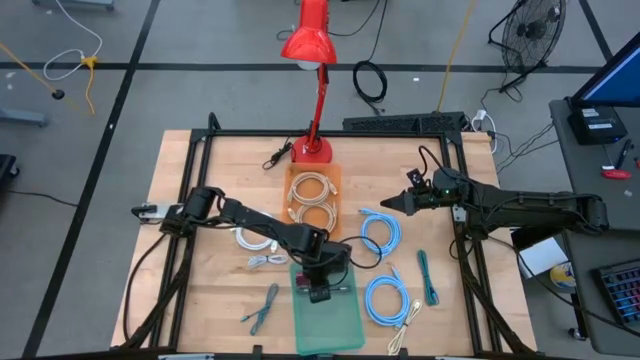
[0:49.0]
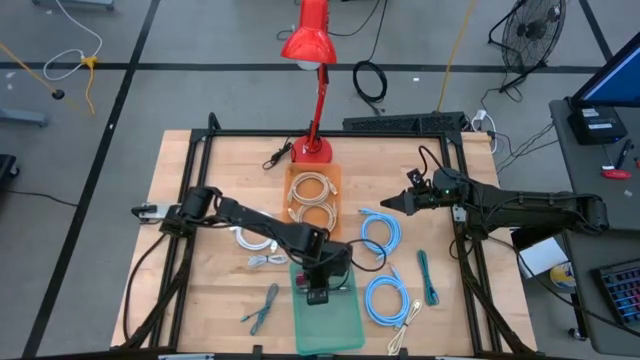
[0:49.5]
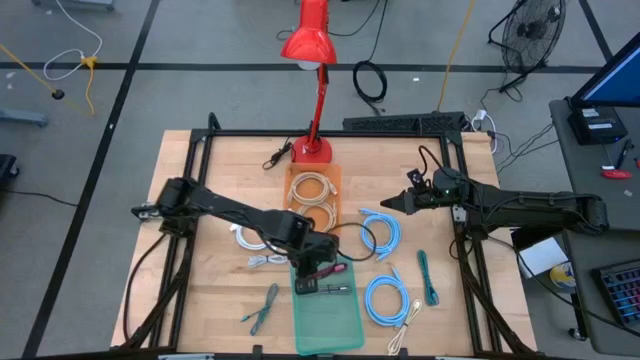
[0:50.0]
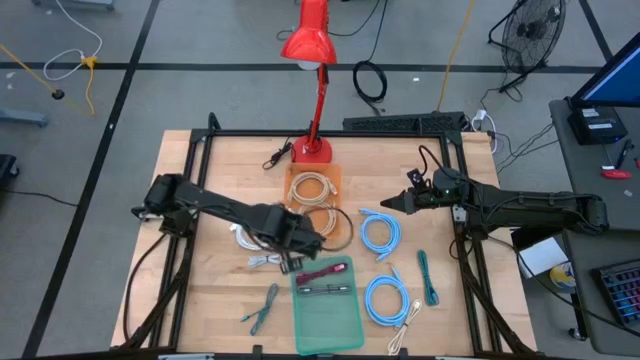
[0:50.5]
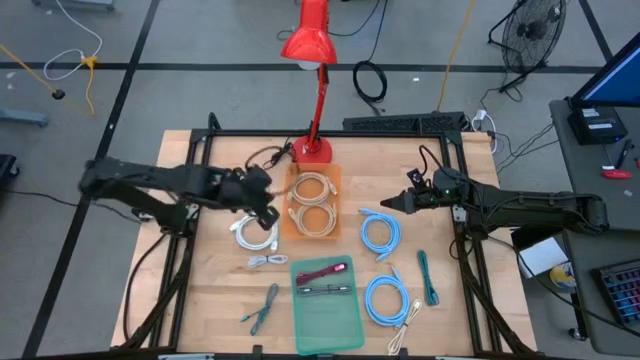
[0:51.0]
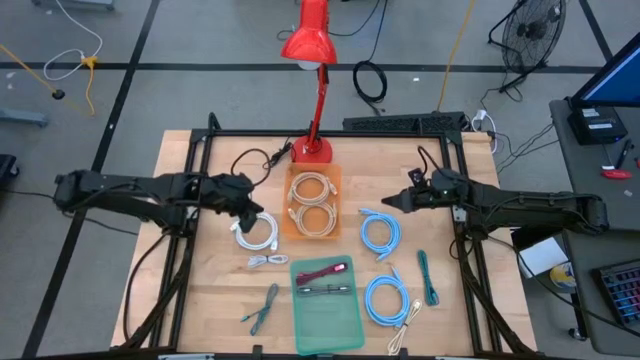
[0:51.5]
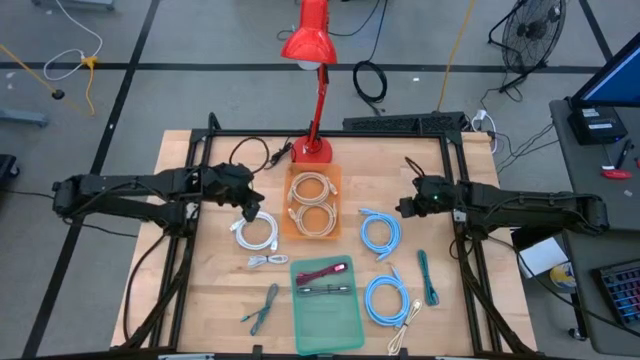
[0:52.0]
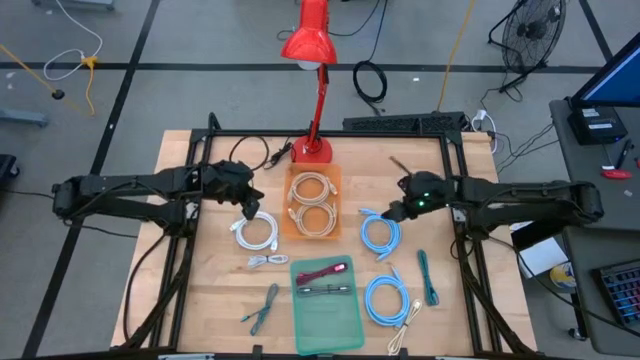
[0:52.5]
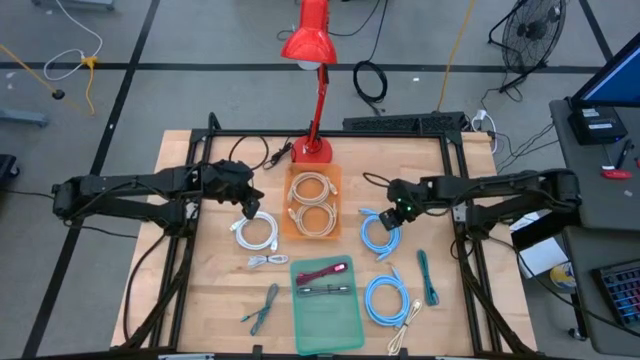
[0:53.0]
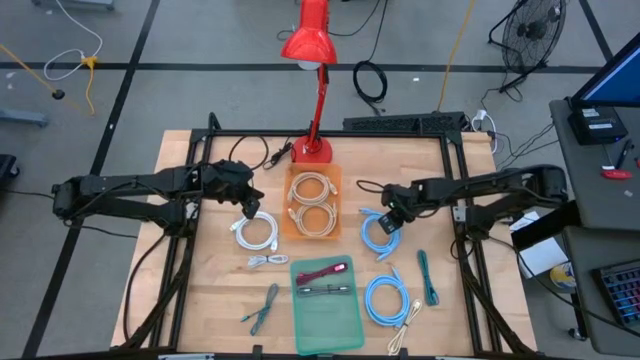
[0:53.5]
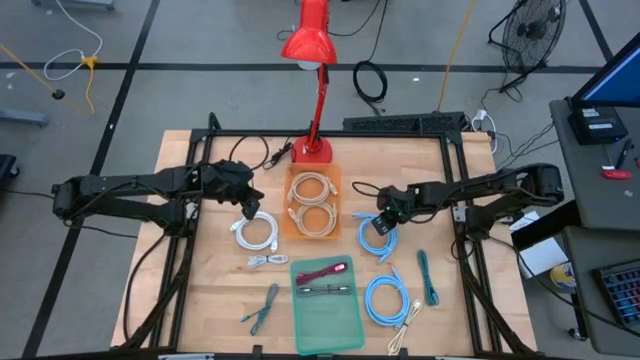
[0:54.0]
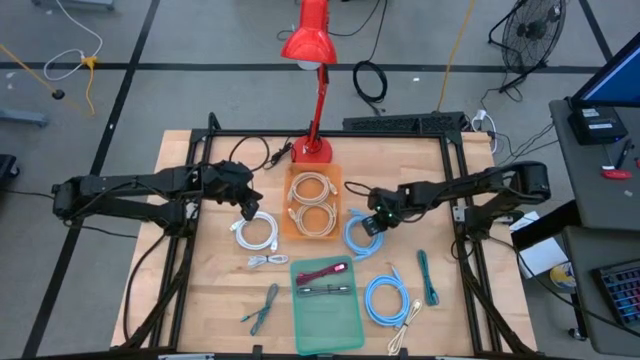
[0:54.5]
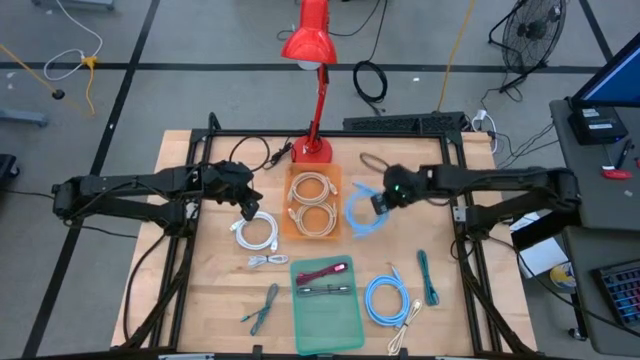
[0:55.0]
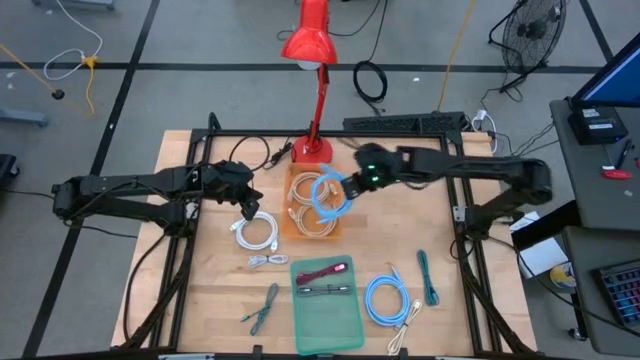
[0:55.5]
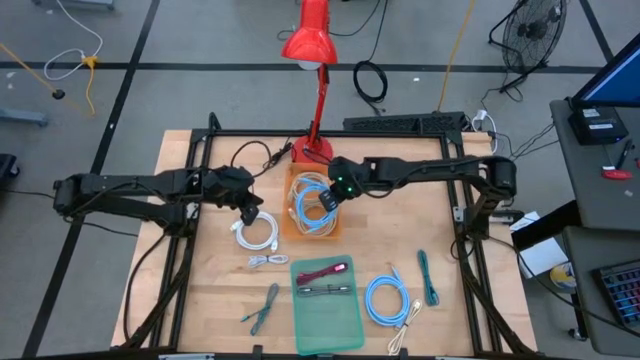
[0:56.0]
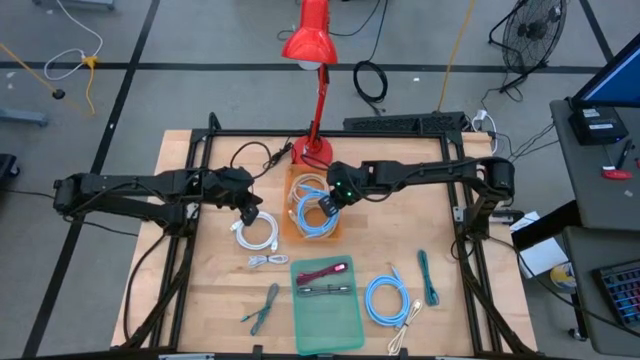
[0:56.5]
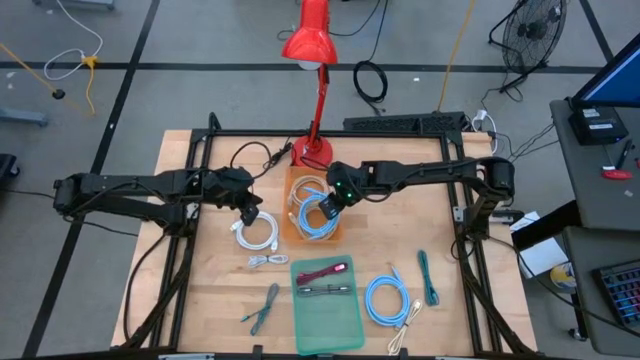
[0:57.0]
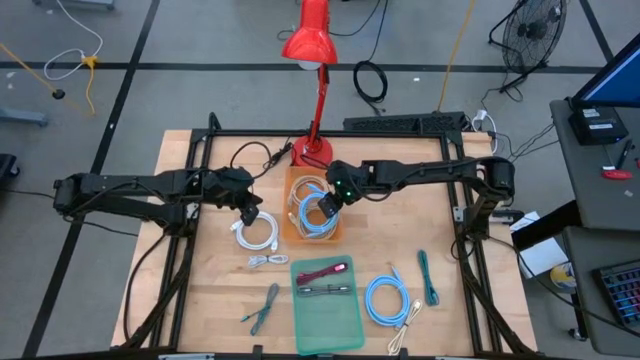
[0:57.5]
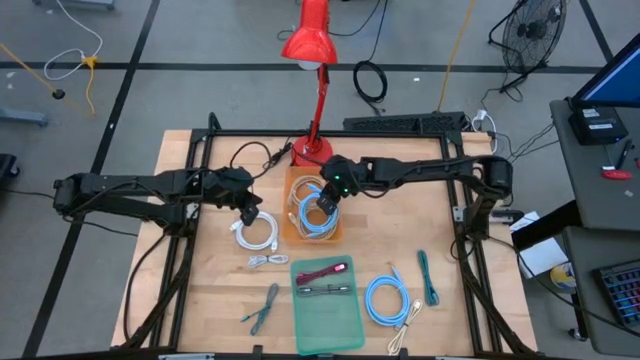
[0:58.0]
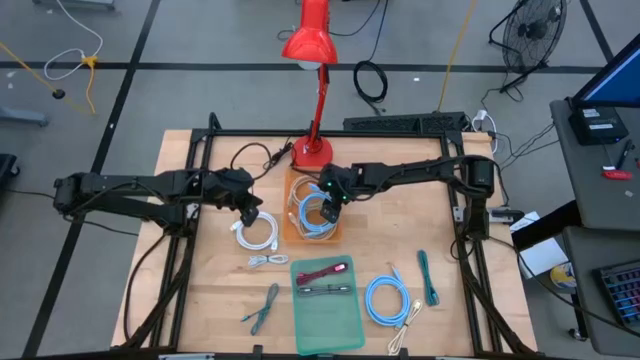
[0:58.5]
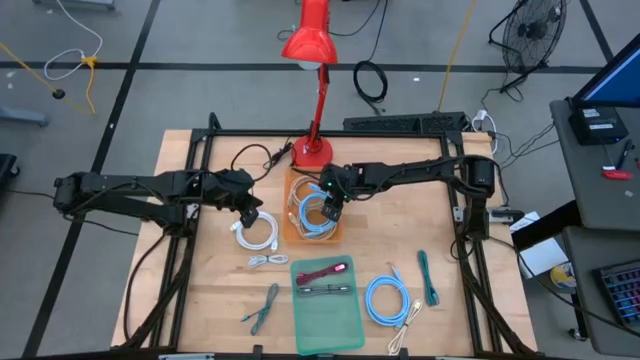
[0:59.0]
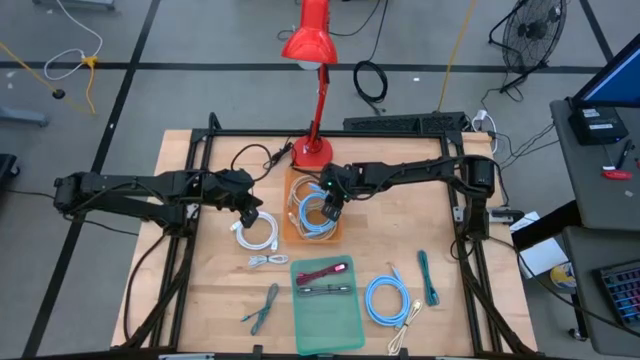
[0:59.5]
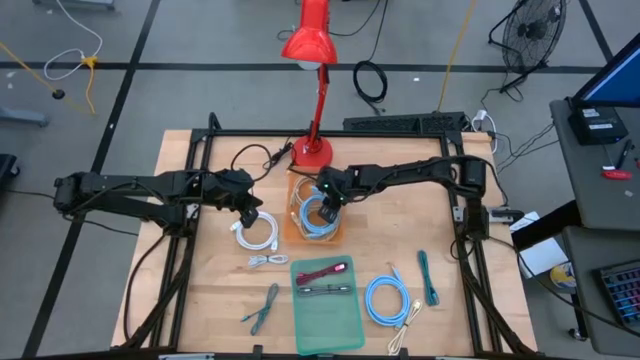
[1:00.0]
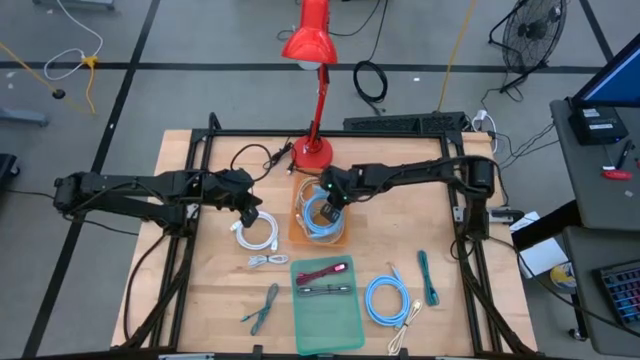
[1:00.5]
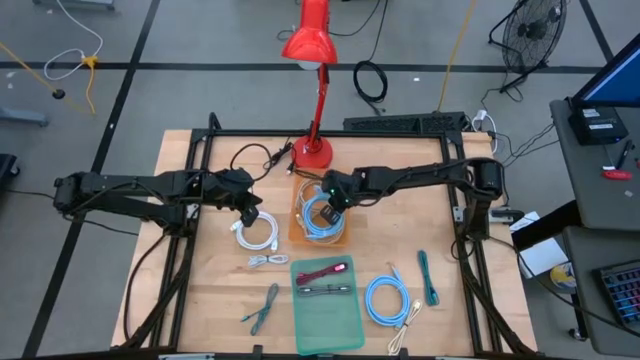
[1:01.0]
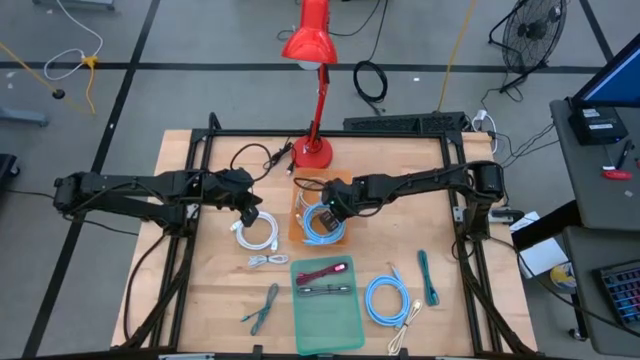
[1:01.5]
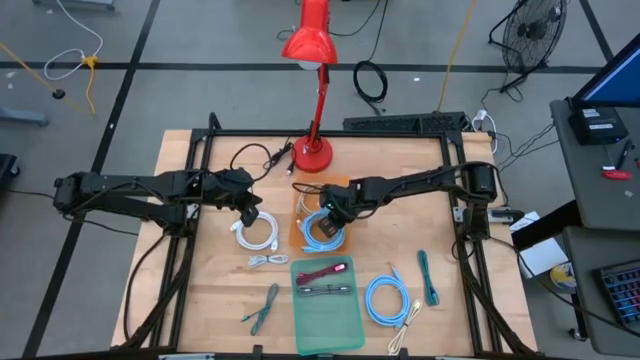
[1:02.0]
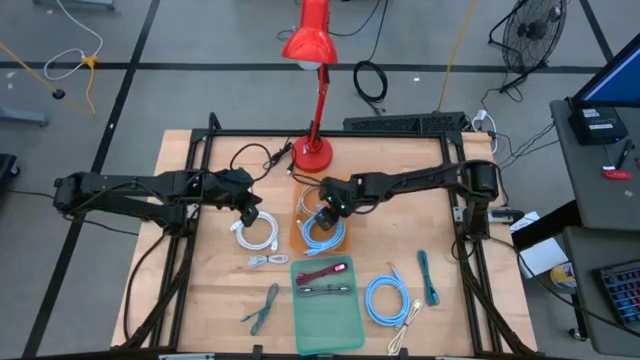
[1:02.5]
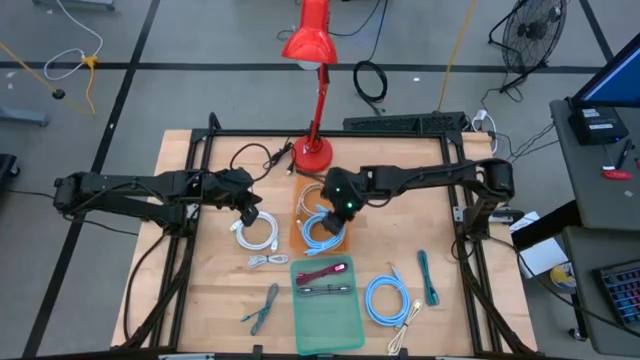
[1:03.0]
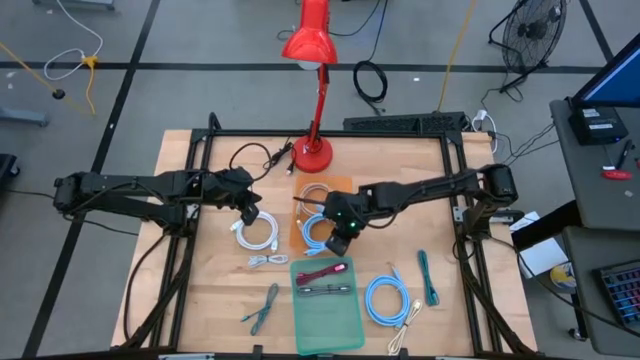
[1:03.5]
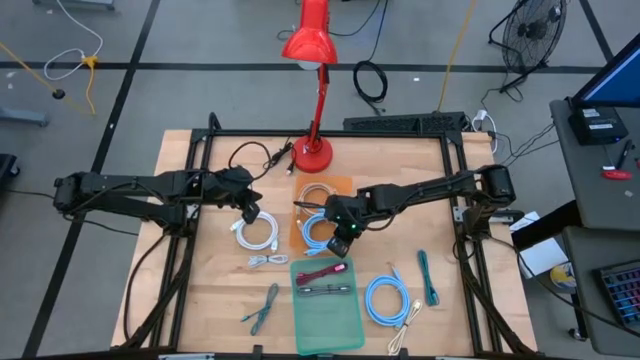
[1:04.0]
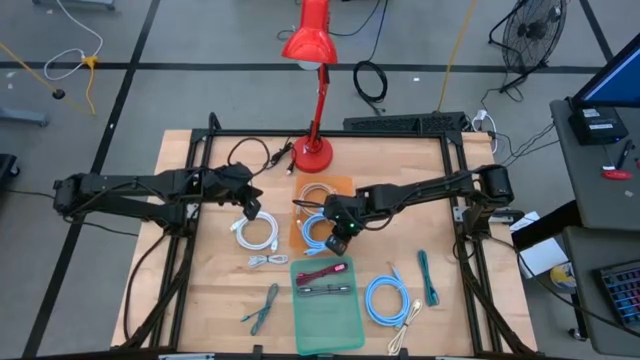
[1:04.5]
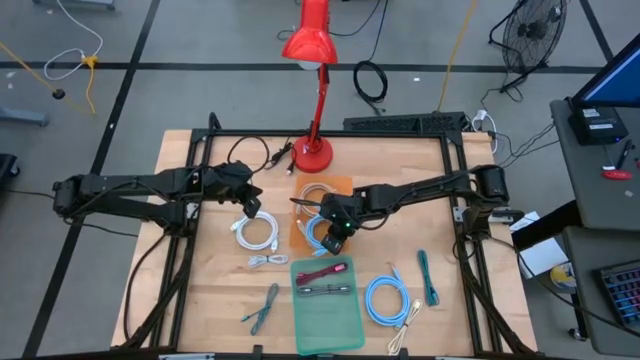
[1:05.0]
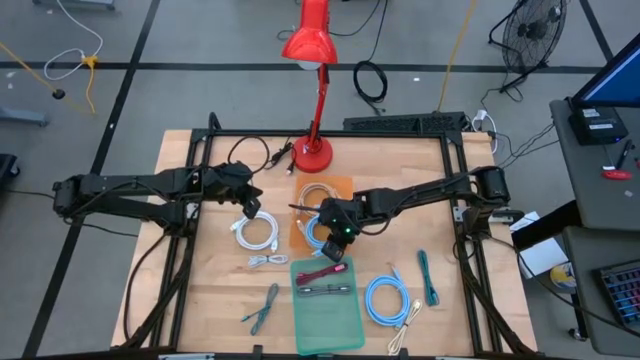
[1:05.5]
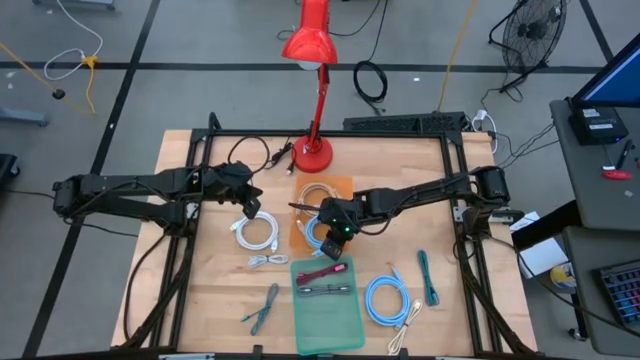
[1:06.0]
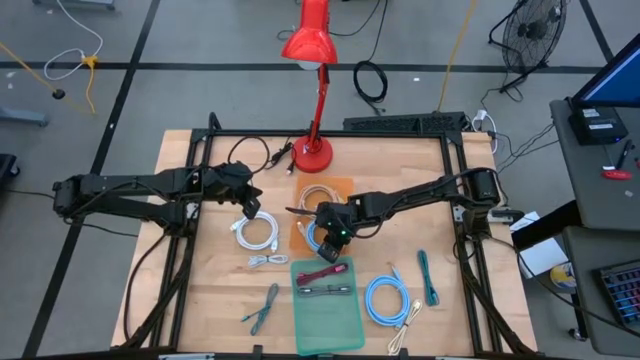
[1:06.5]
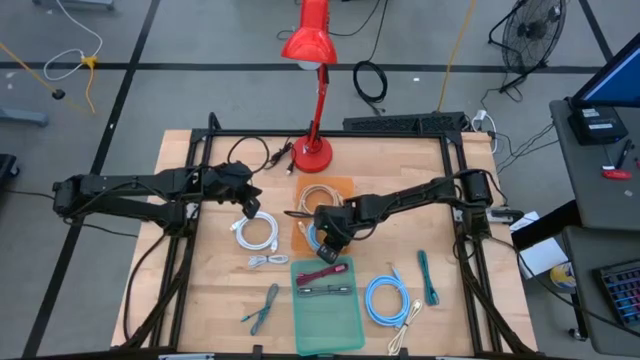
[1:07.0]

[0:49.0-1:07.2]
Task: Sort cables
Put the top blue video cable into the orange bin

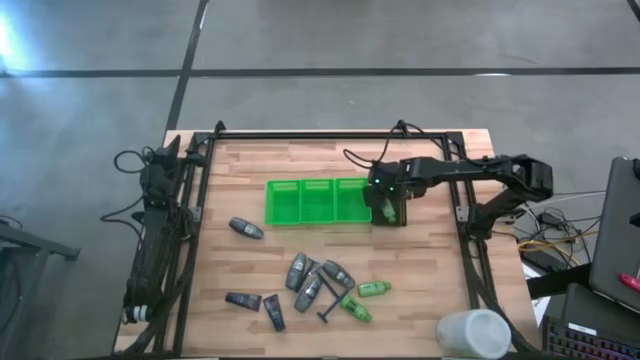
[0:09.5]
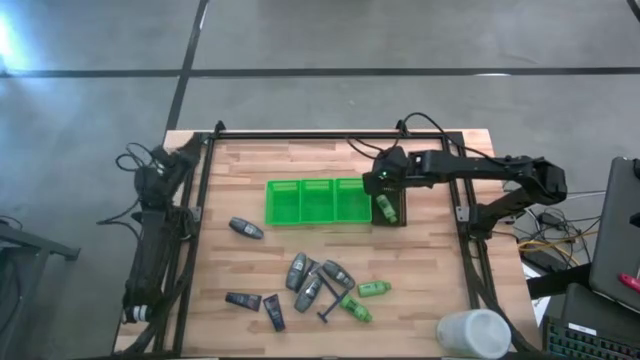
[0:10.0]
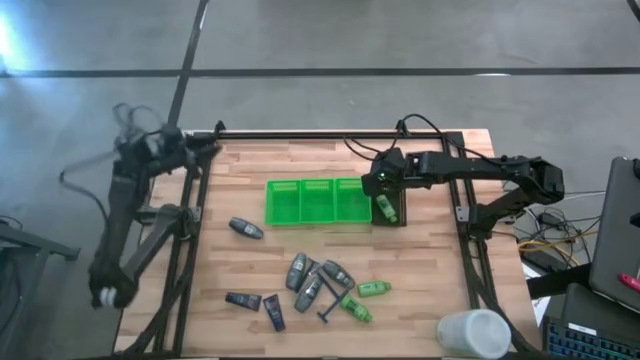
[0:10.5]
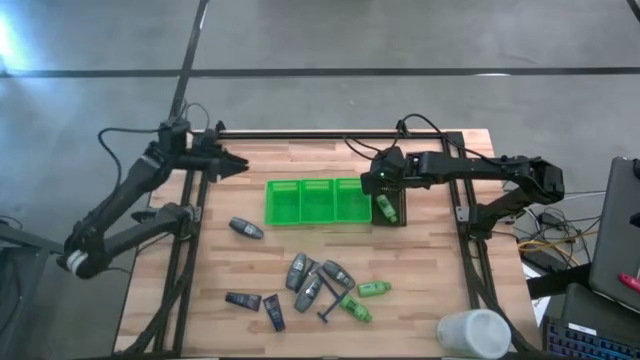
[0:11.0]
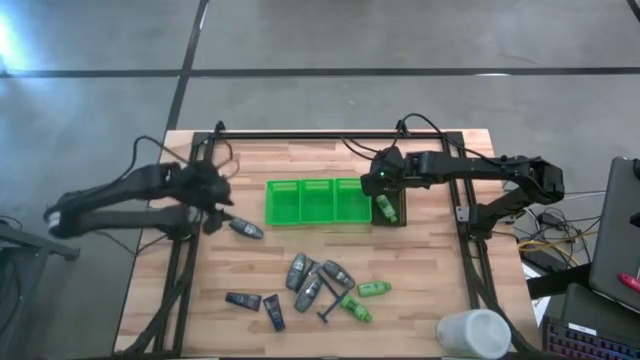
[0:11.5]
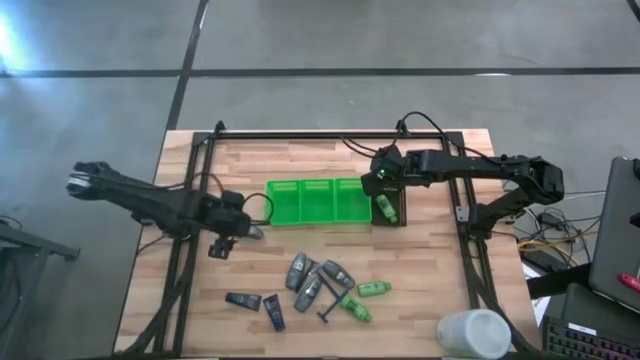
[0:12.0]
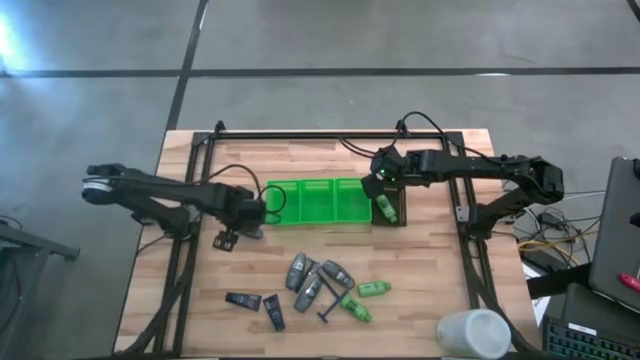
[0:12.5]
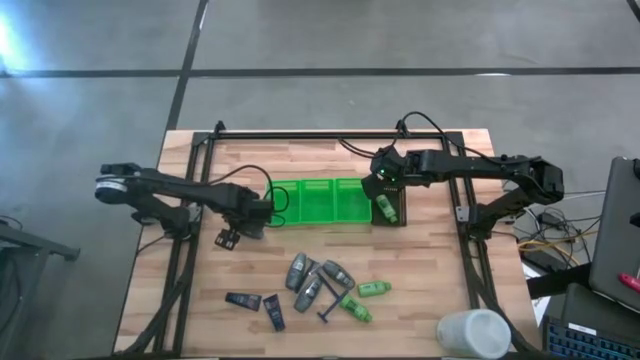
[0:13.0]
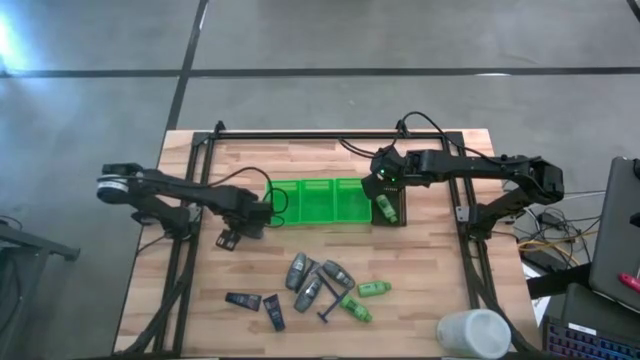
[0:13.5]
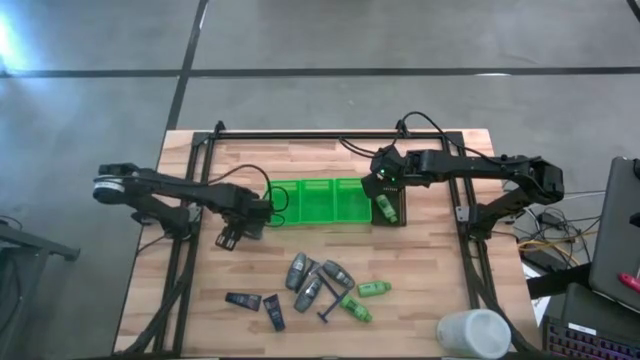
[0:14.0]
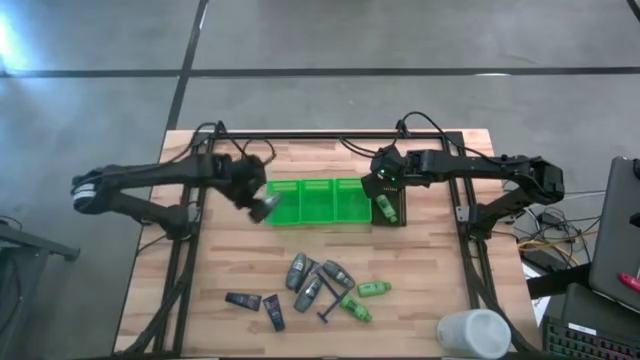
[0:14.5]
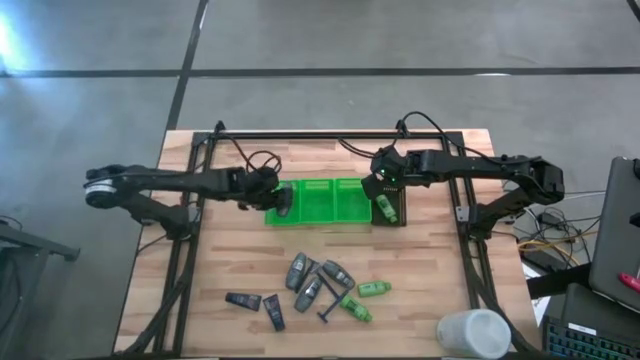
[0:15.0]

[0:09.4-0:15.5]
Task: Pick & Place Travel size toiletries
Put the deodorant into the left green bin
